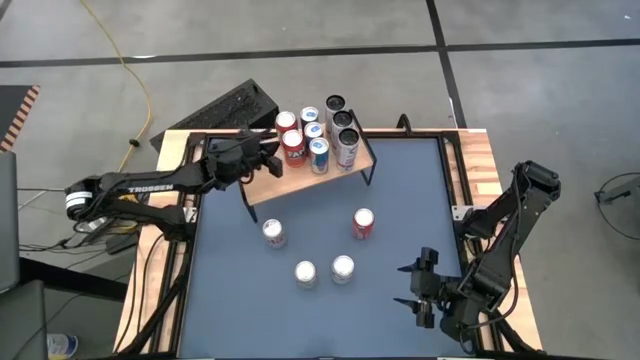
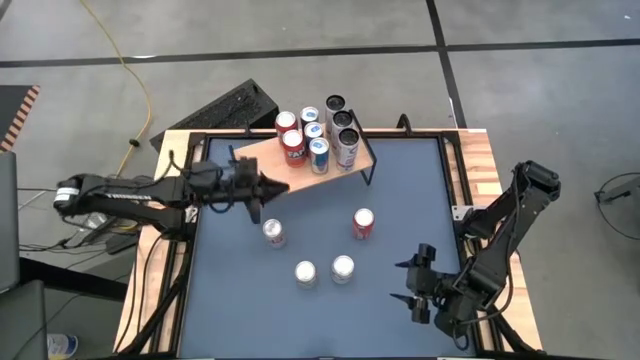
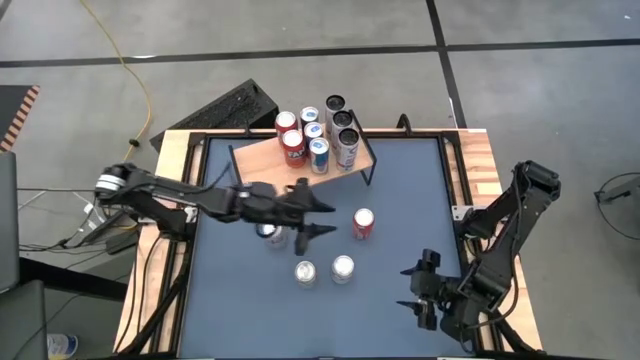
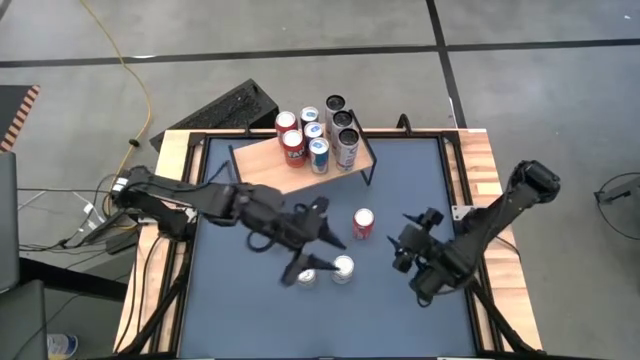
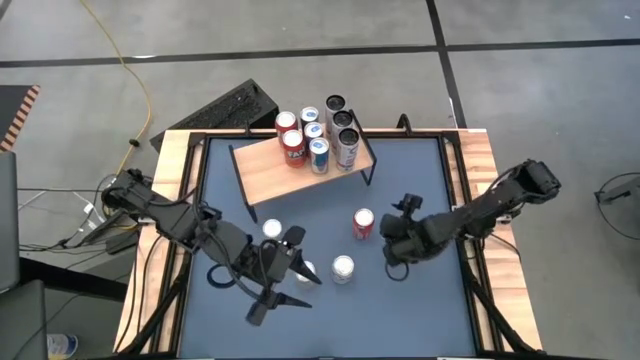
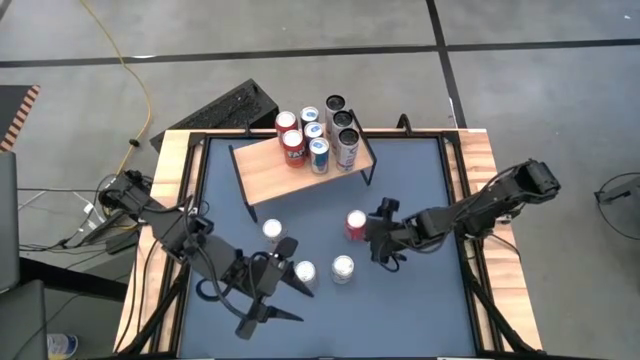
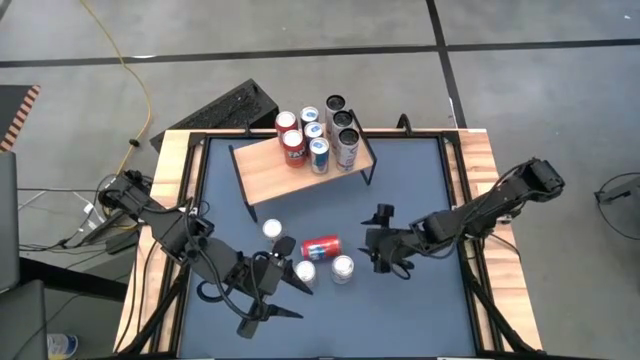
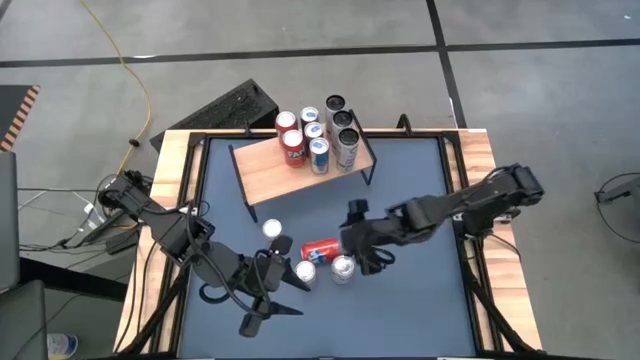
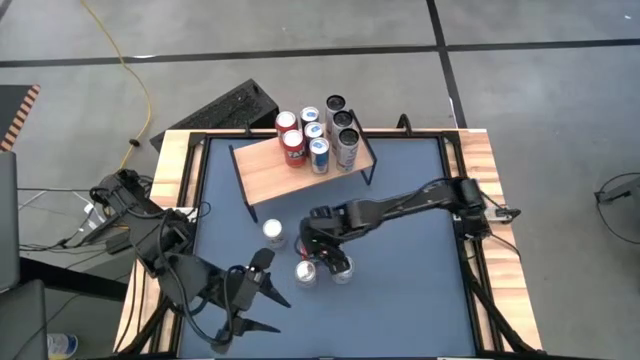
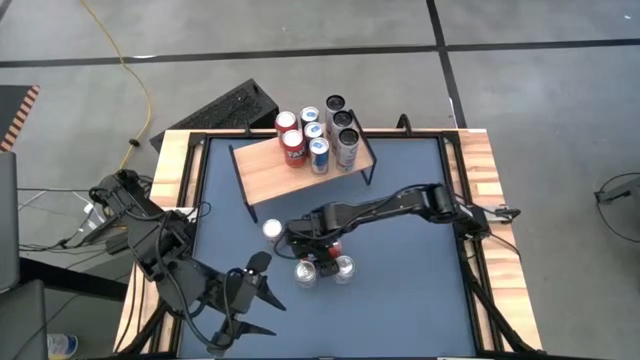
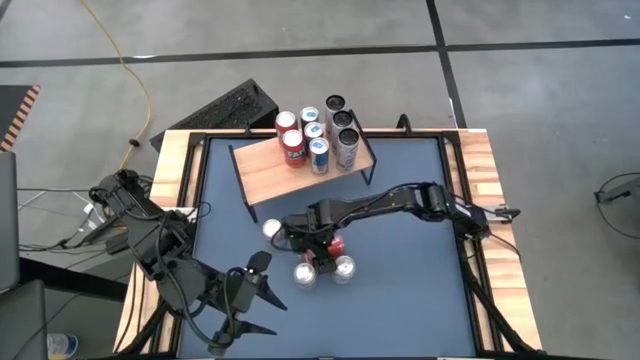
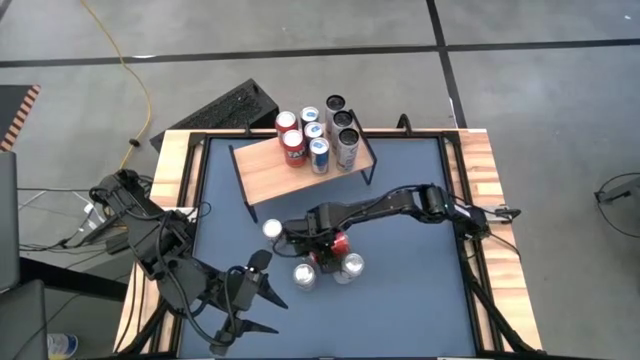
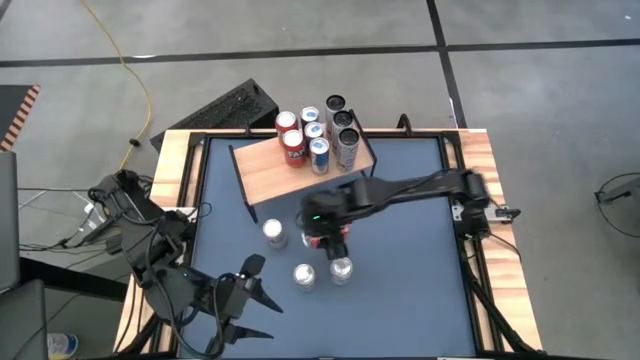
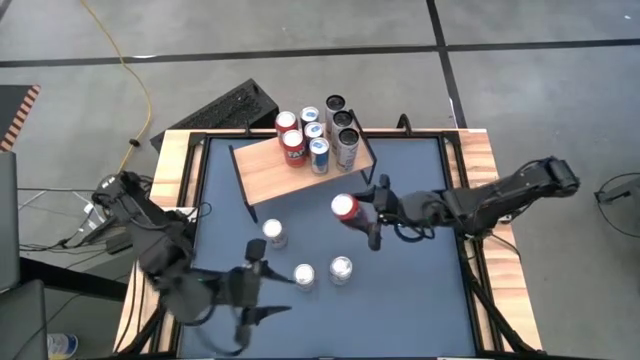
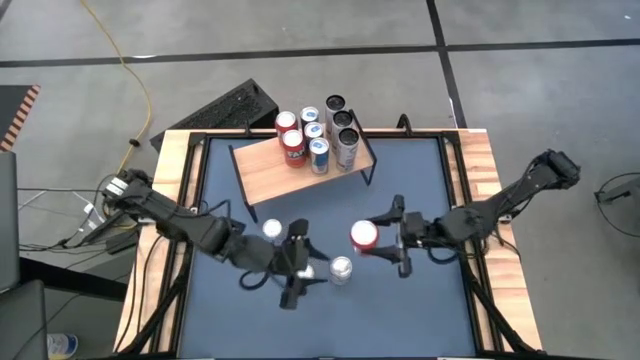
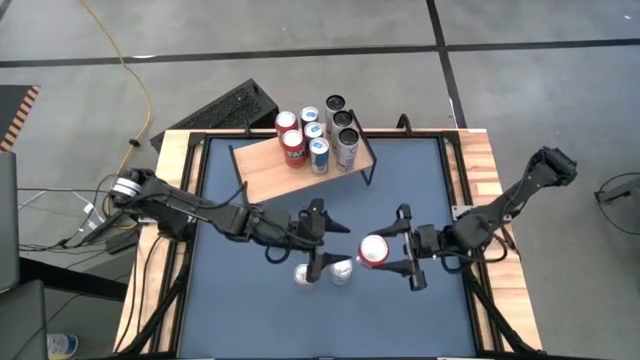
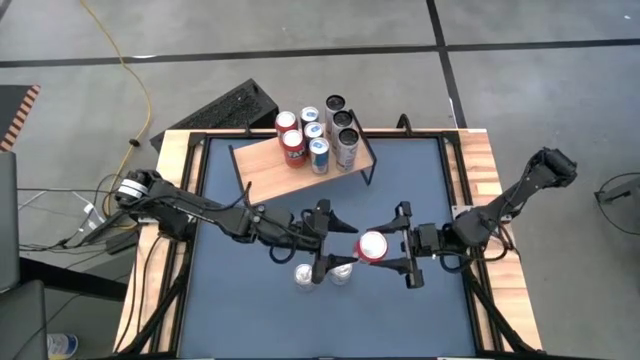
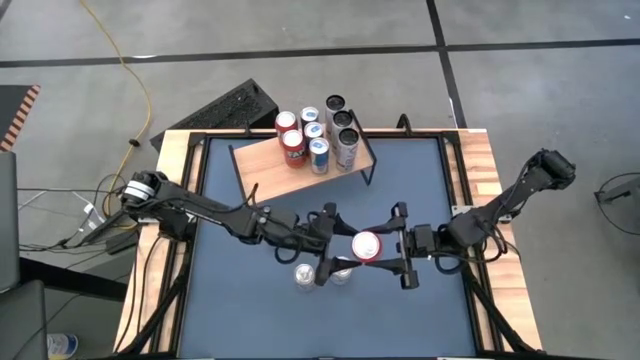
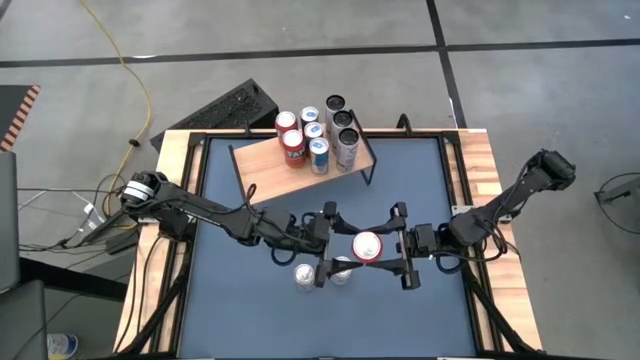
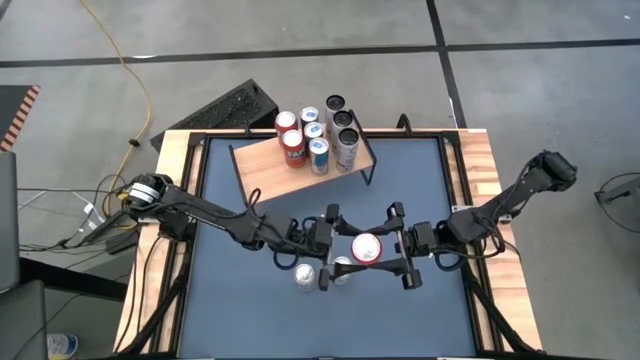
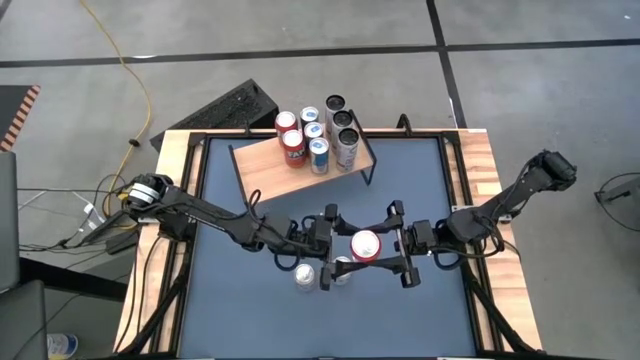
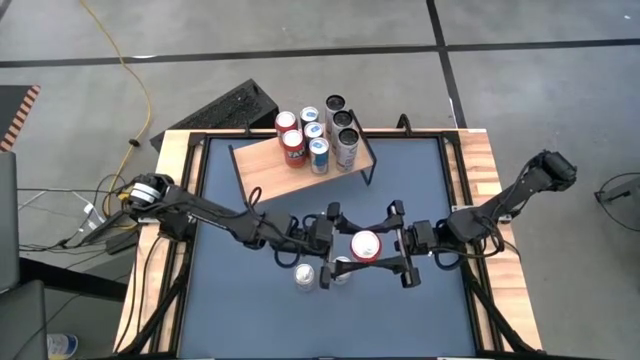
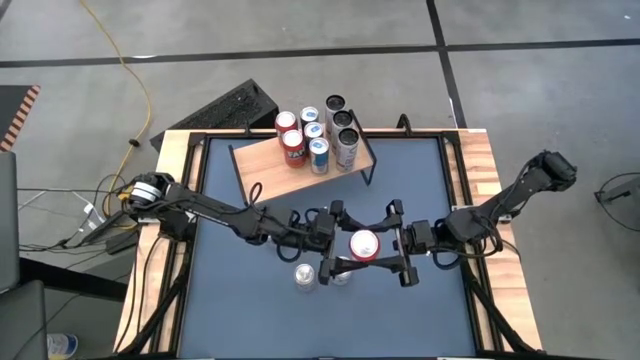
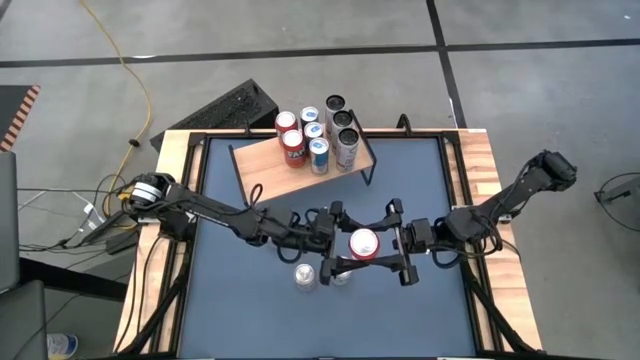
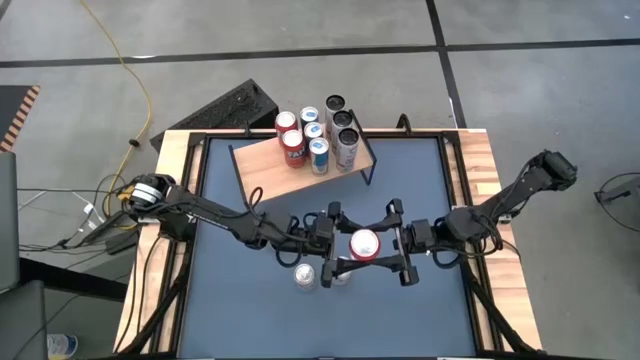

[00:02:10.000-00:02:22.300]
Task: Place canned beverage on shelf
Put the red soda can on the shelf aligned with the other red soda cans
